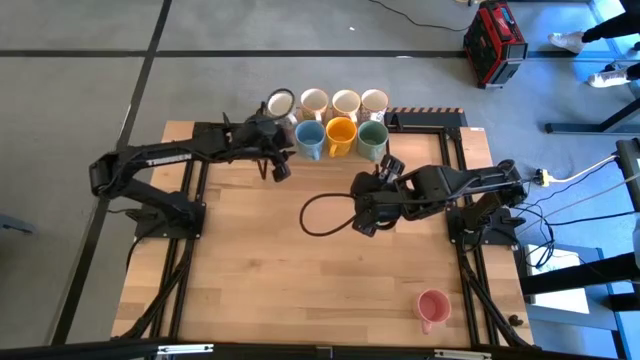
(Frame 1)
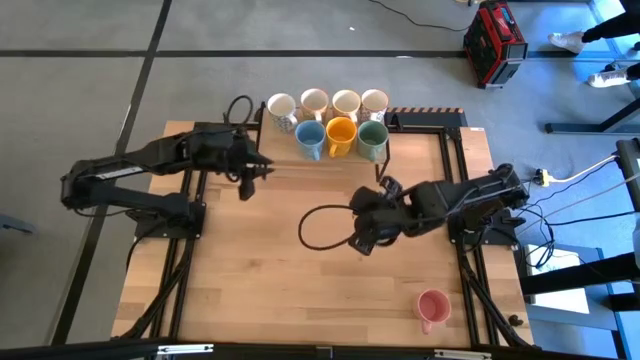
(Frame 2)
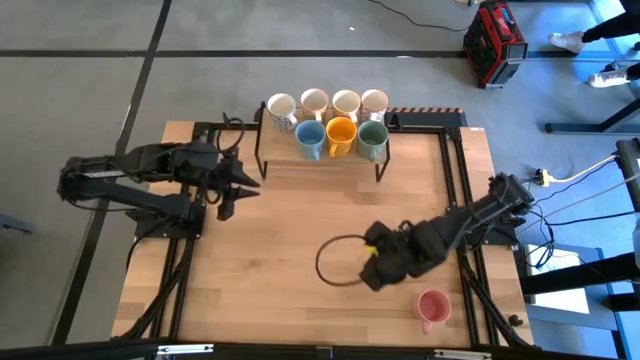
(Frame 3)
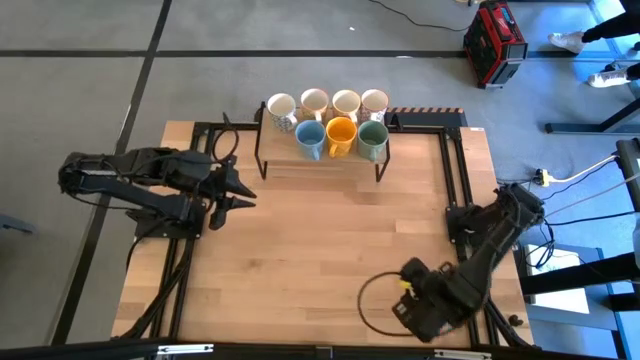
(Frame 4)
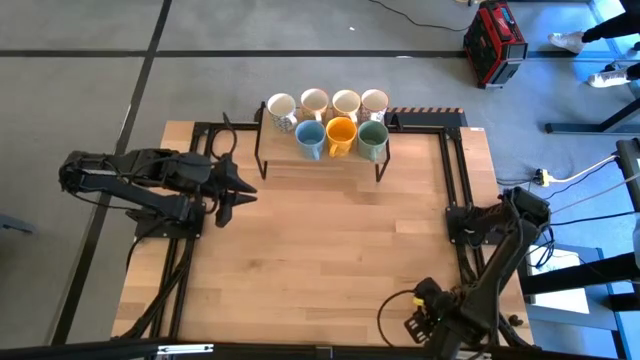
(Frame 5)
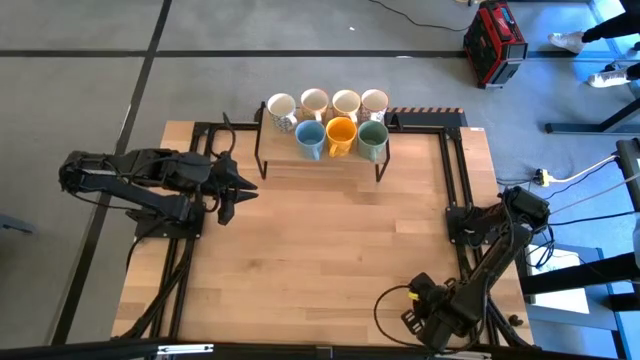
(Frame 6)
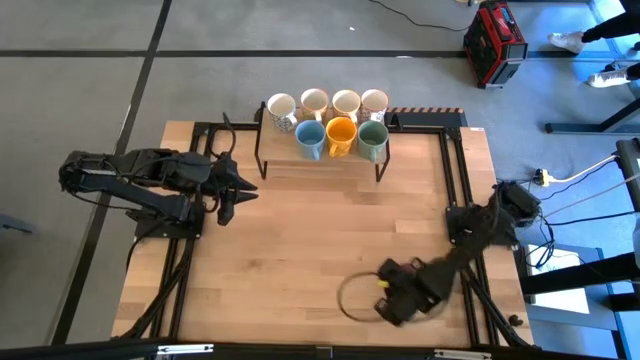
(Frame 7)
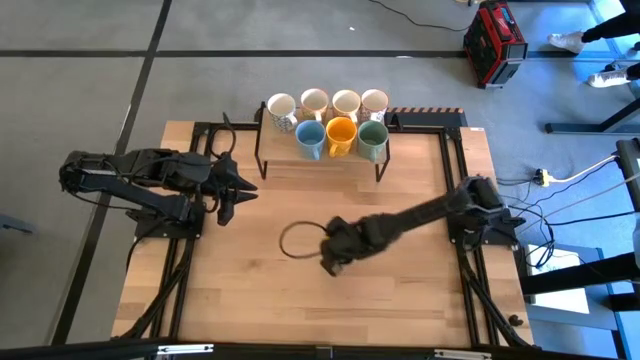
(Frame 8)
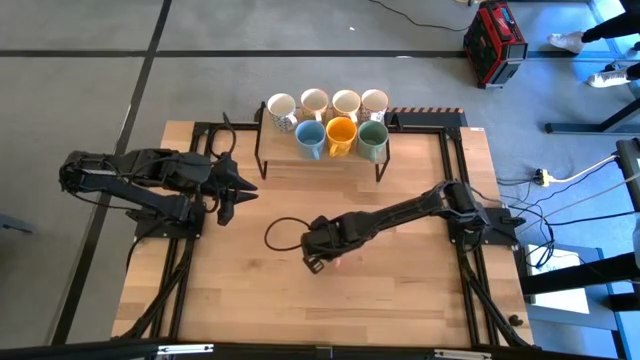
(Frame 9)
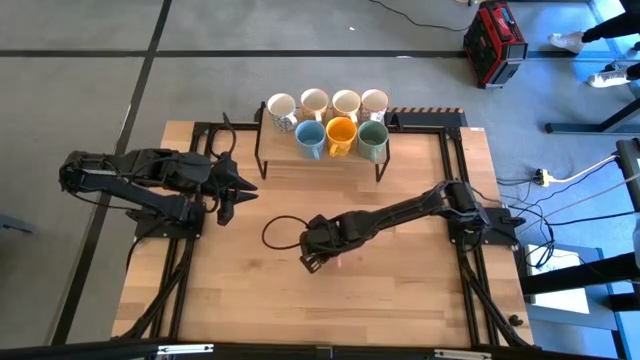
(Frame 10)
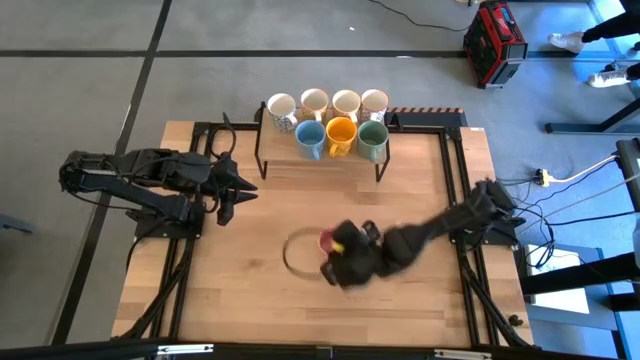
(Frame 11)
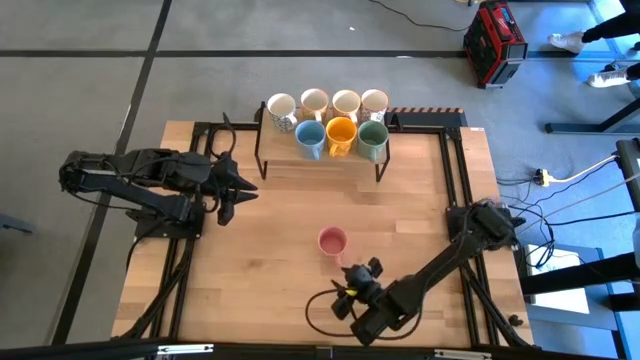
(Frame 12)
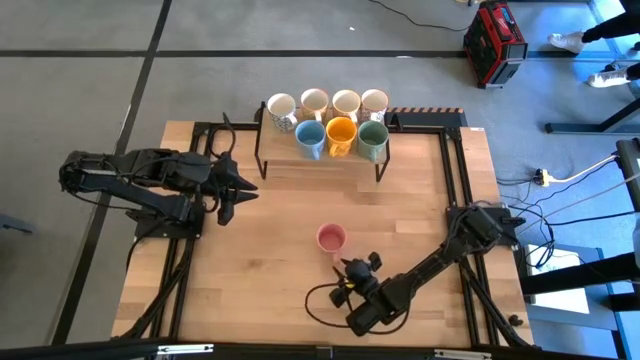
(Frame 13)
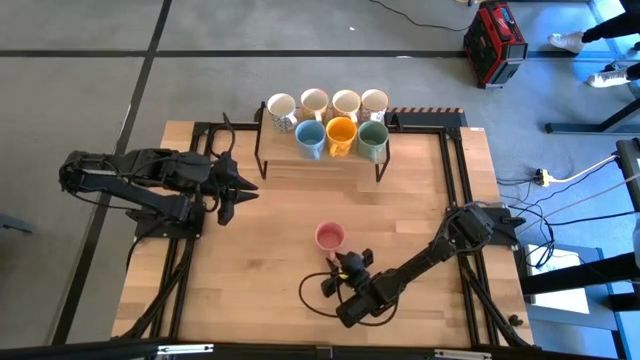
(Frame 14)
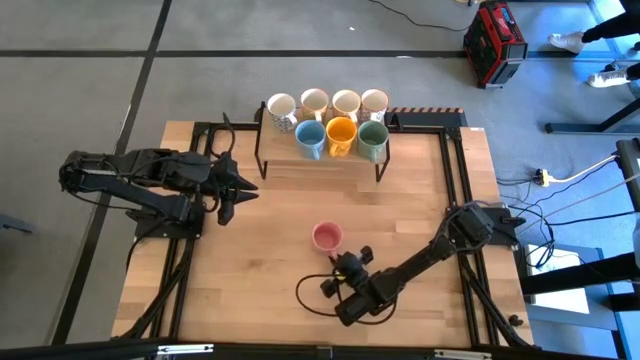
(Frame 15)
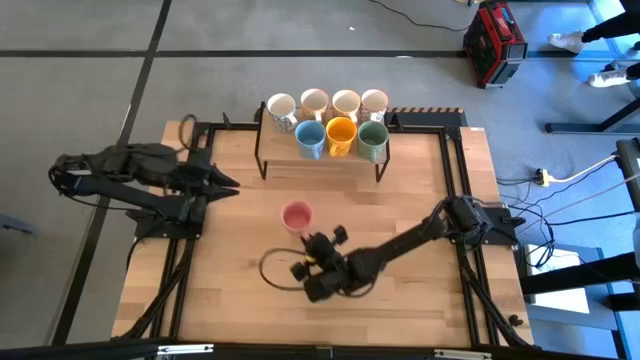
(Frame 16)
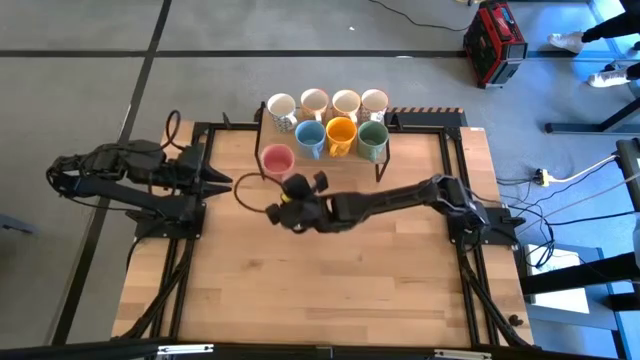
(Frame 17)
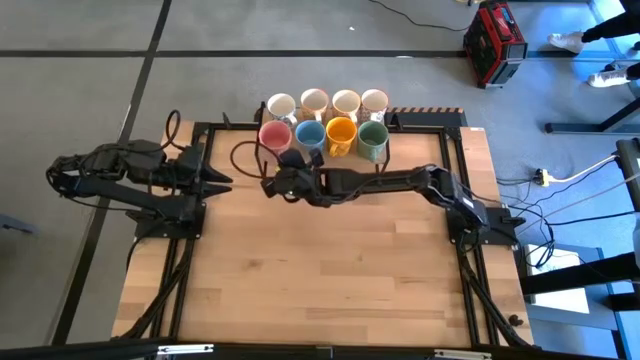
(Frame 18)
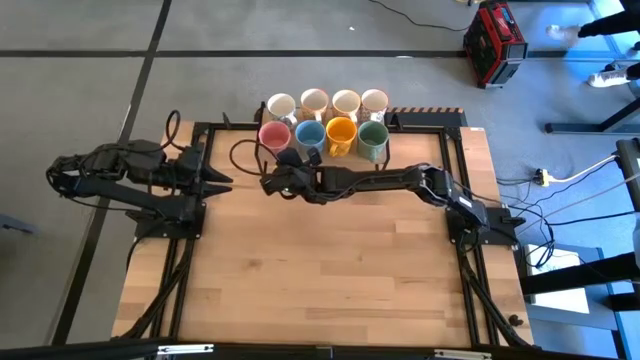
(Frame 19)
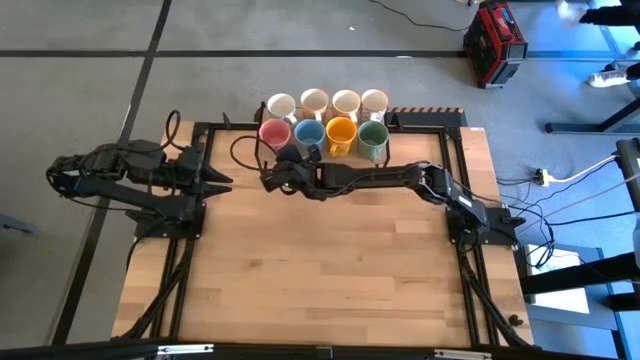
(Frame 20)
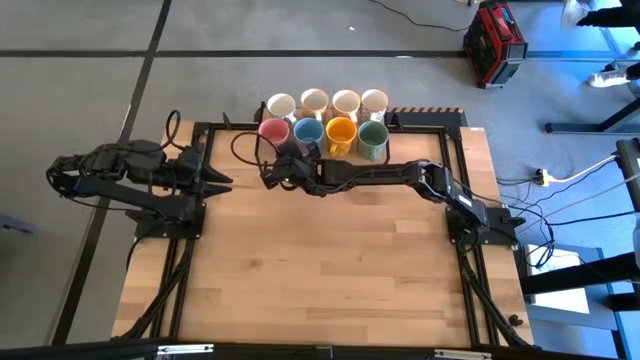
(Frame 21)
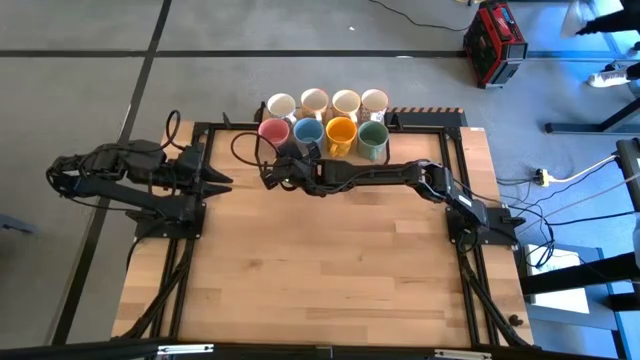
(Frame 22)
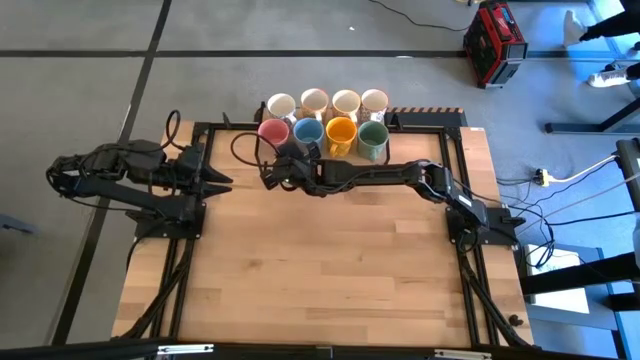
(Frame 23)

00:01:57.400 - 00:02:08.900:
Task: Place coffee mugs
Put the pink mug on the shelf

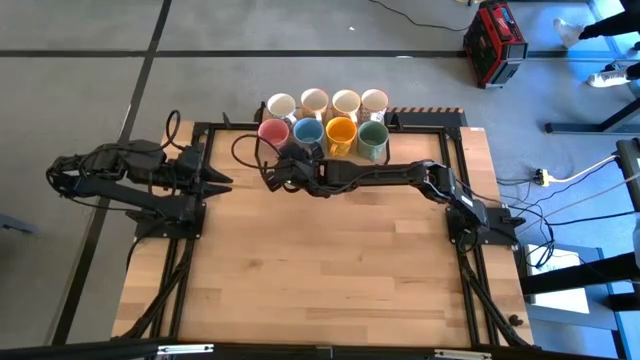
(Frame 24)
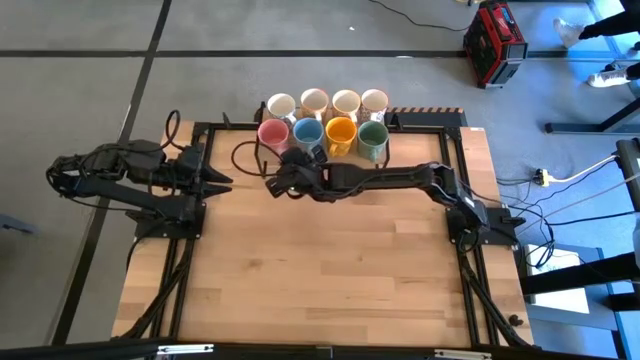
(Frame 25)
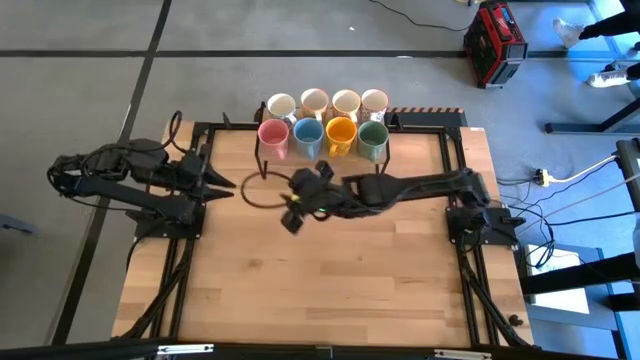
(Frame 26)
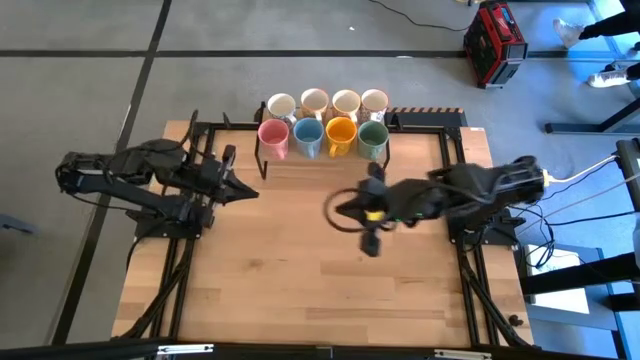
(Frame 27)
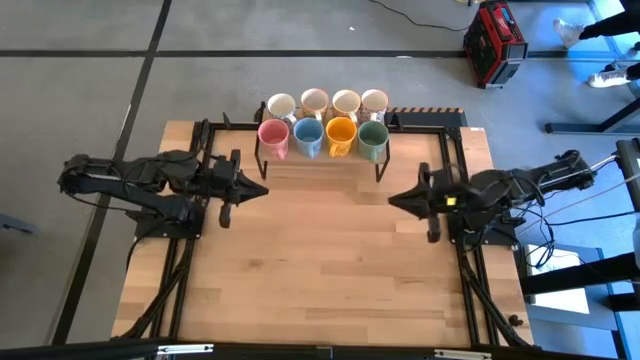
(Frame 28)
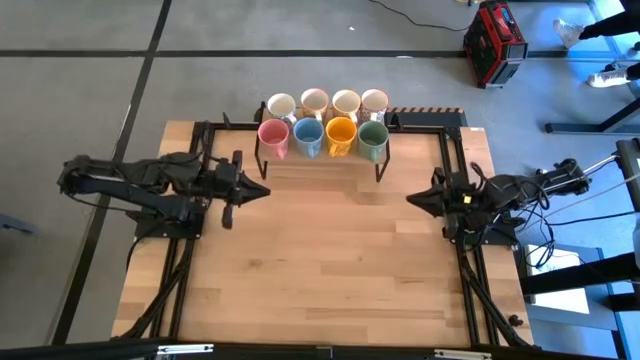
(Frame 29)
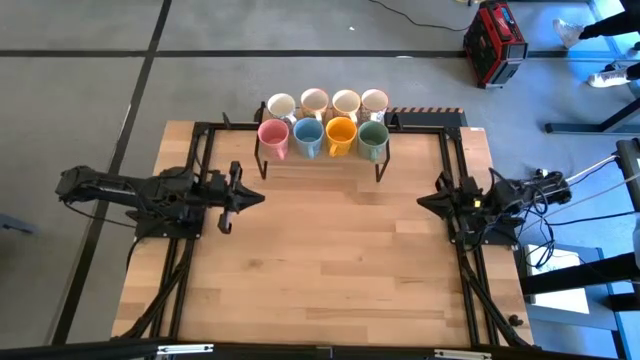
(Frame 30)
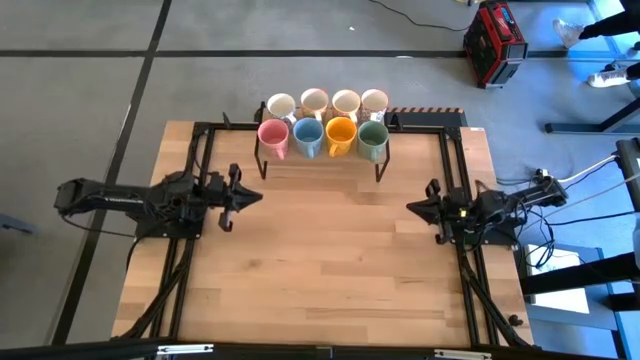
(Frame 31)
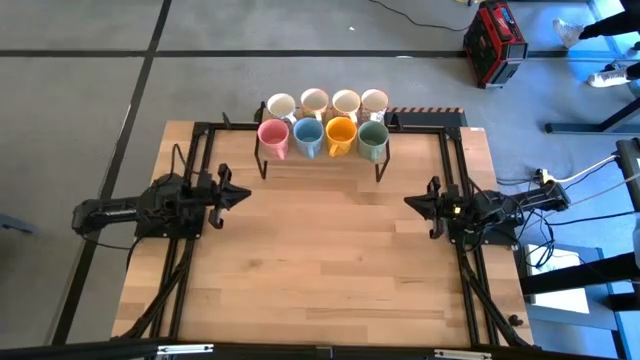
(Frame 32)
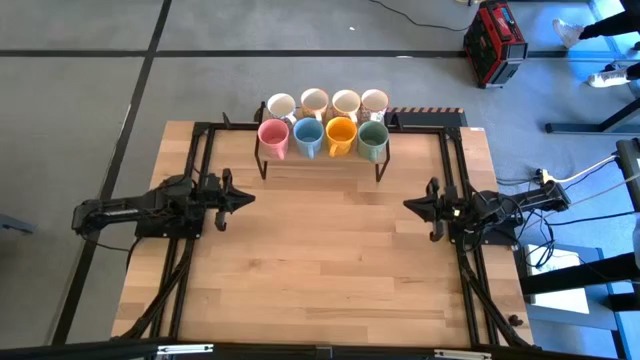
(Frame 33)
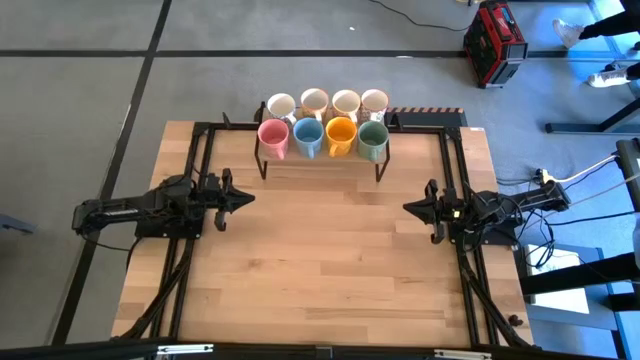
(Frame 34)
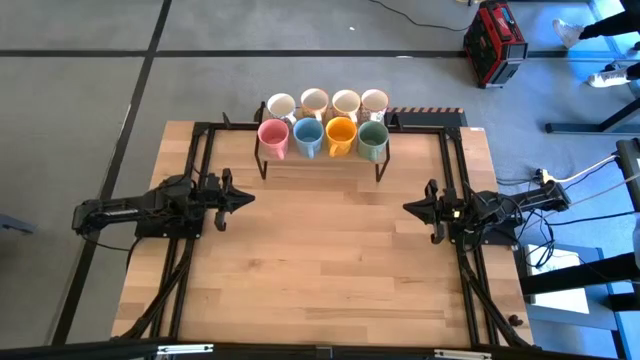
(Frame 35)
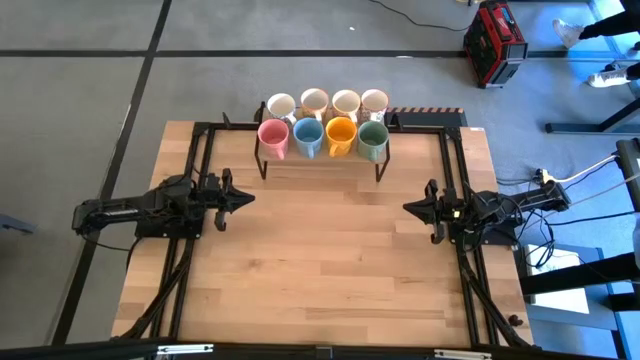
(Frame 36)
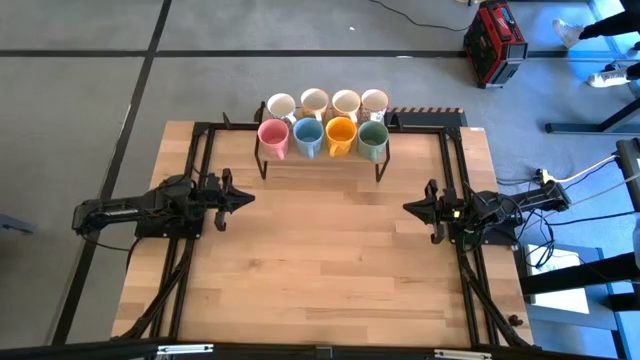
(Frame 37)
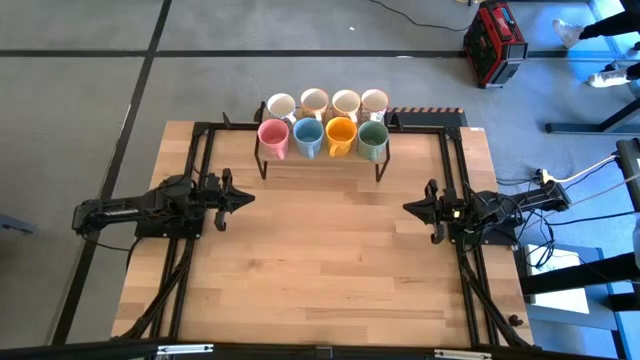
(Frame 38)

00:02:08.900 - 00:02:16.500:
Return to Home Position

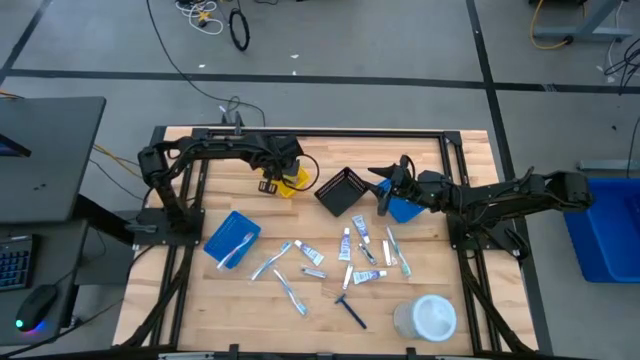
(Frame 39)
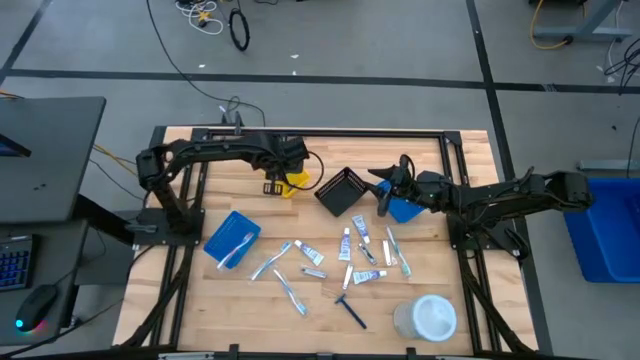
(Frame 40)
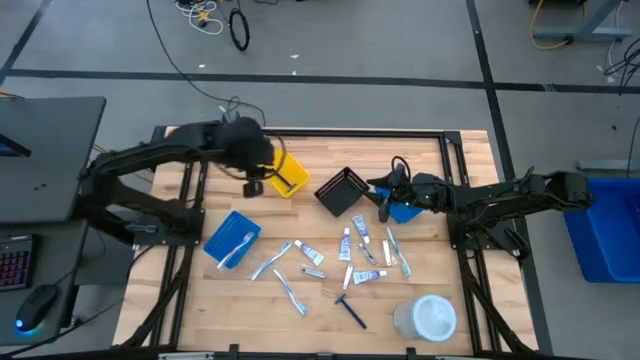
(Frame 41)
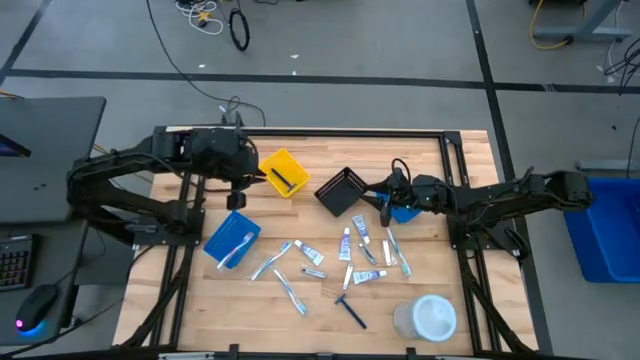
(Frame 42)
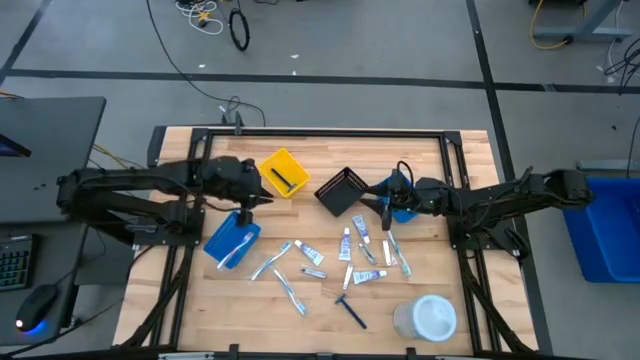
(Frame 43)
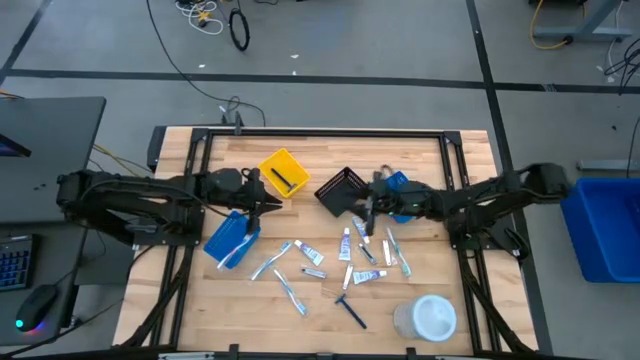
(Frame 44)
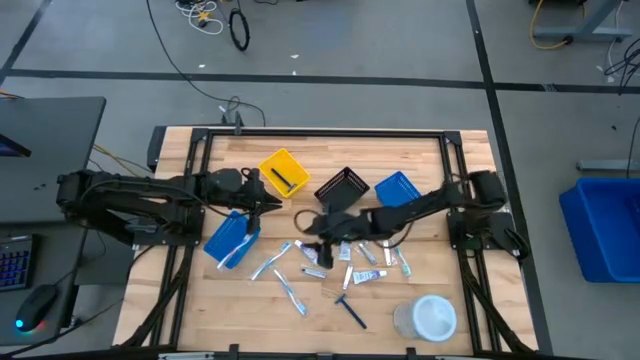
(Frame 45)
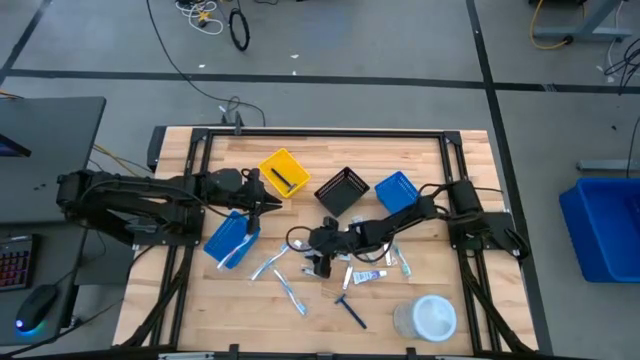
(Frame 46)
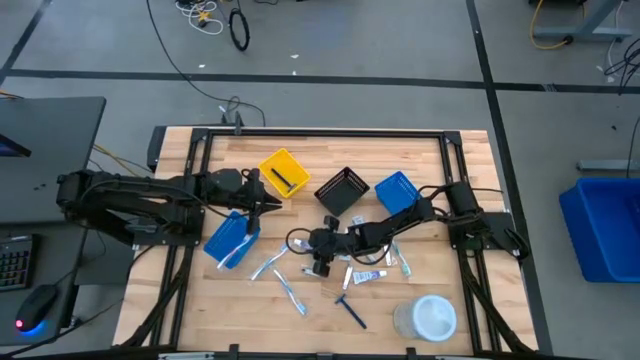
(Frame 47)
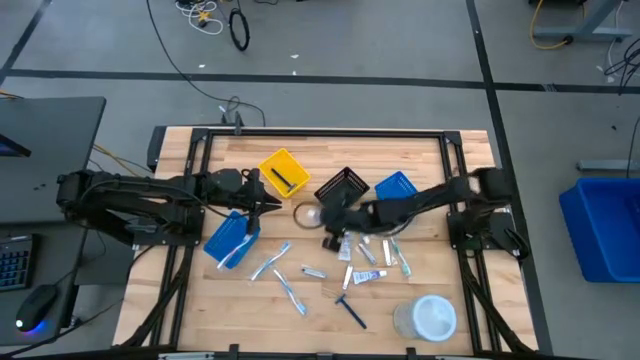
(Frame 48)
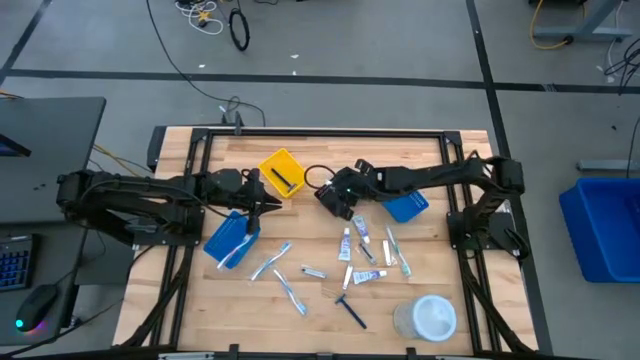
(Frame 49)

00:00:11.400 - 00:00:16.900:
Task: Pick & Place Travel size toiletries
Put the white toothpaste into the black bin
